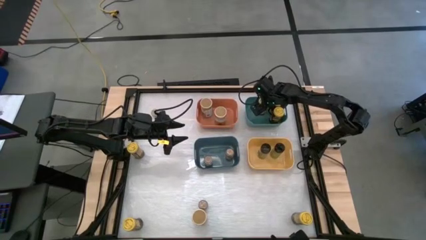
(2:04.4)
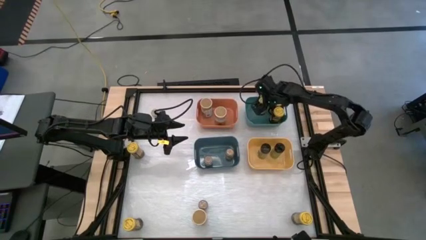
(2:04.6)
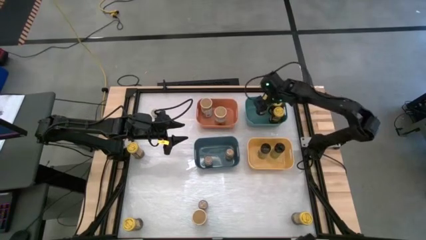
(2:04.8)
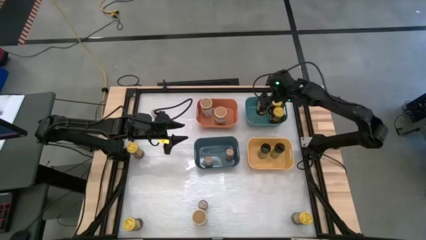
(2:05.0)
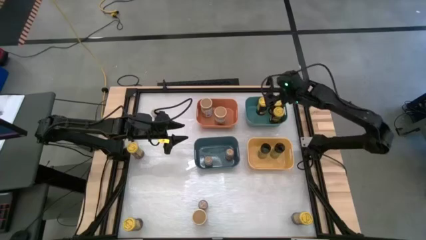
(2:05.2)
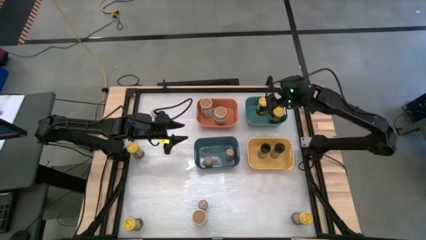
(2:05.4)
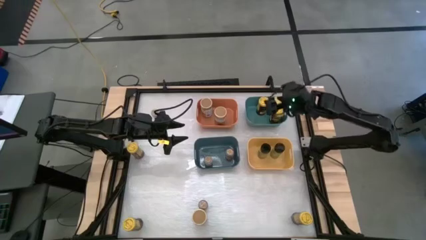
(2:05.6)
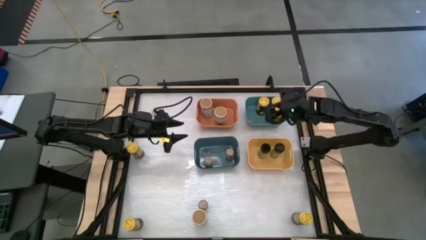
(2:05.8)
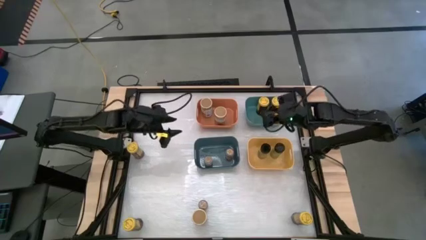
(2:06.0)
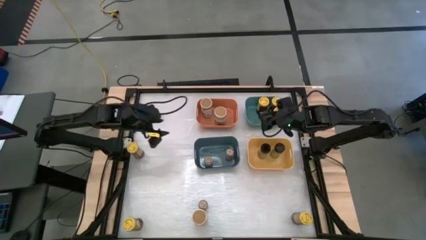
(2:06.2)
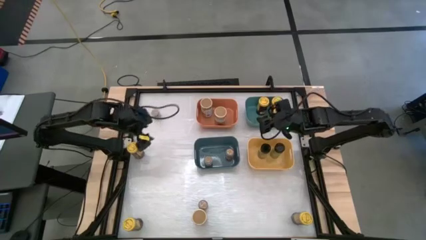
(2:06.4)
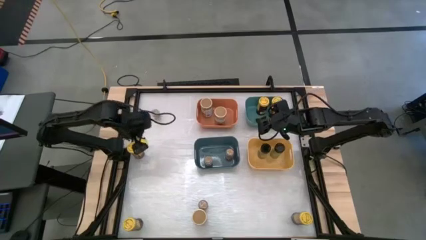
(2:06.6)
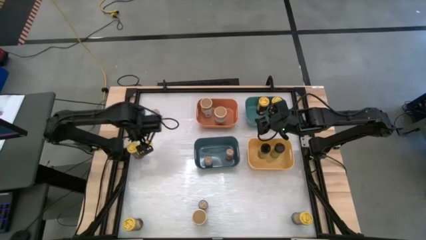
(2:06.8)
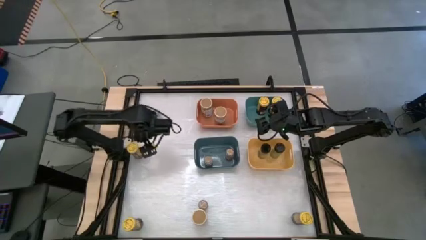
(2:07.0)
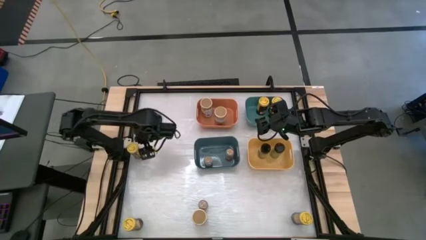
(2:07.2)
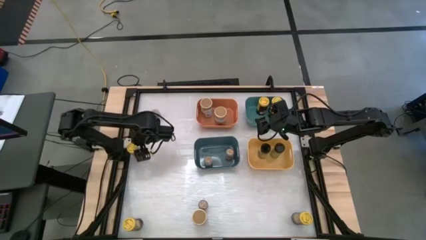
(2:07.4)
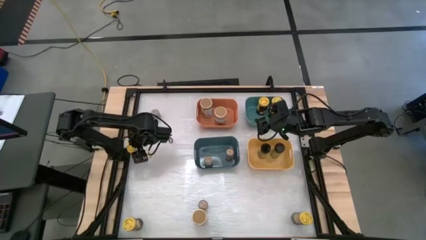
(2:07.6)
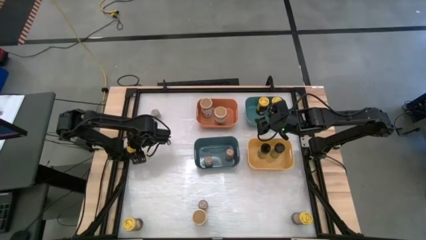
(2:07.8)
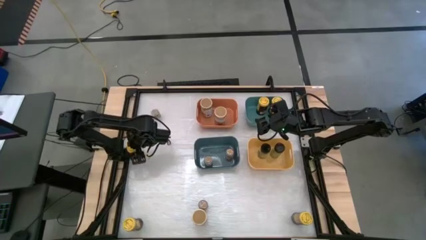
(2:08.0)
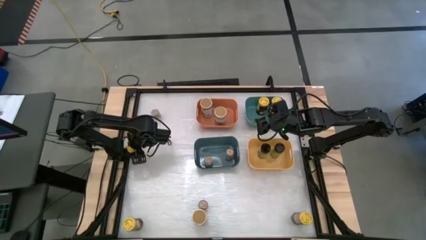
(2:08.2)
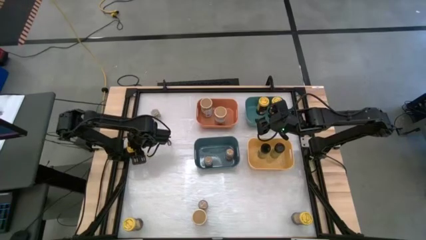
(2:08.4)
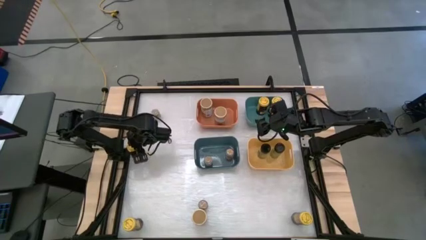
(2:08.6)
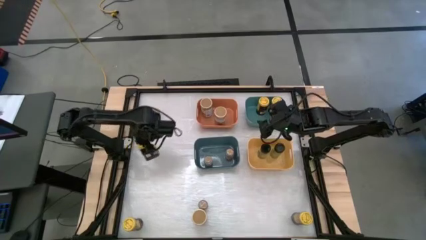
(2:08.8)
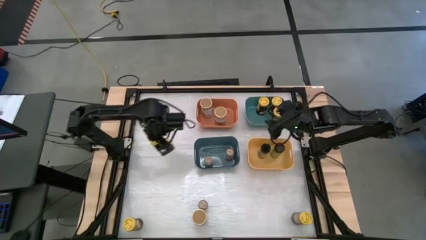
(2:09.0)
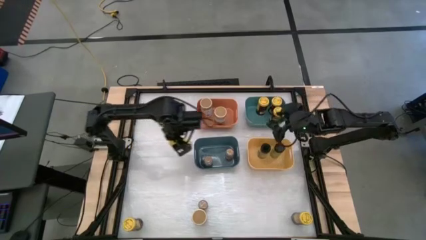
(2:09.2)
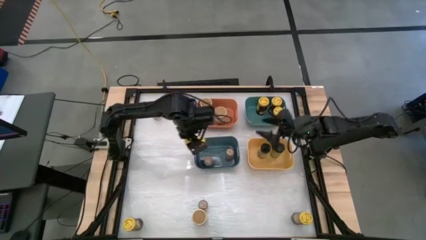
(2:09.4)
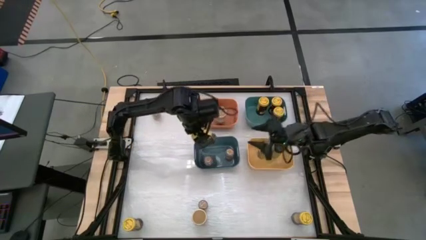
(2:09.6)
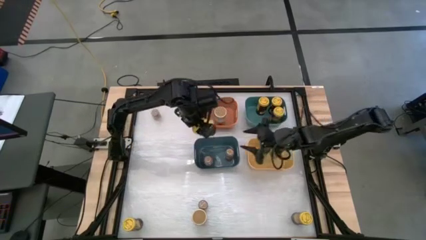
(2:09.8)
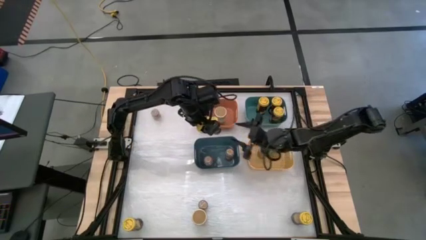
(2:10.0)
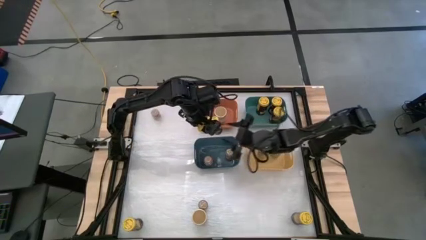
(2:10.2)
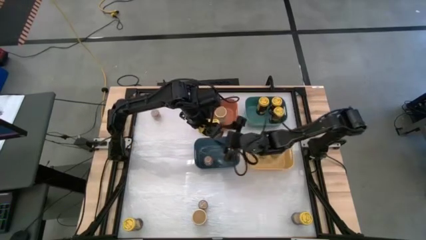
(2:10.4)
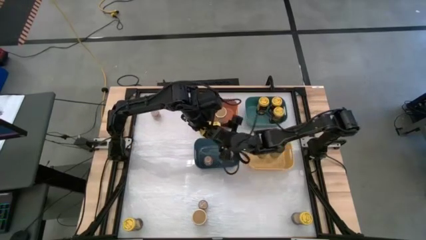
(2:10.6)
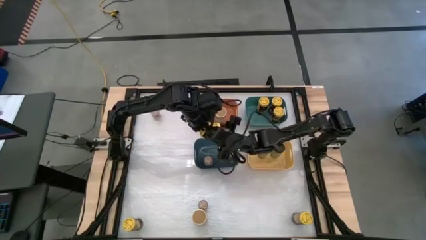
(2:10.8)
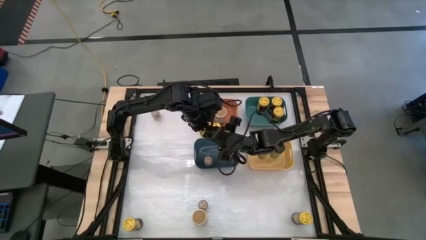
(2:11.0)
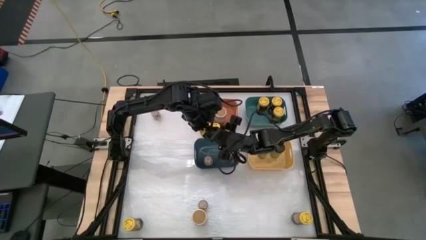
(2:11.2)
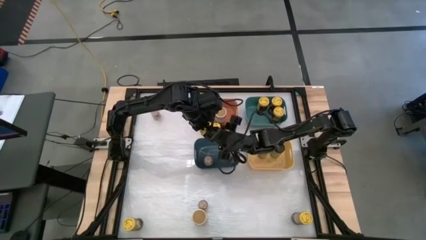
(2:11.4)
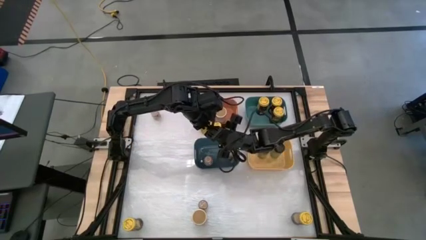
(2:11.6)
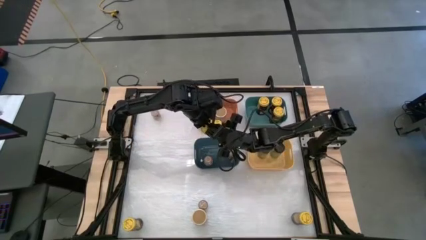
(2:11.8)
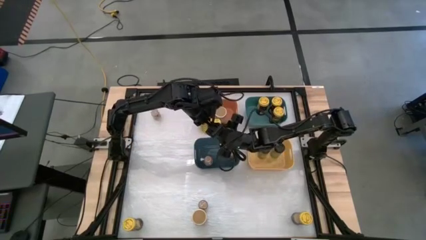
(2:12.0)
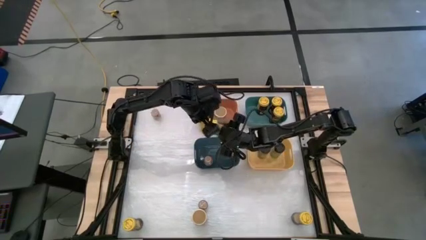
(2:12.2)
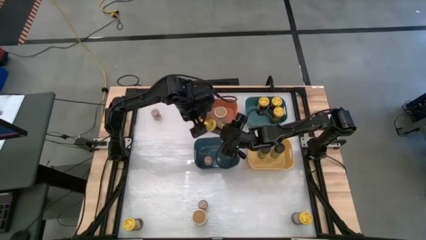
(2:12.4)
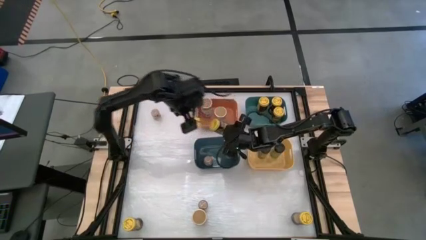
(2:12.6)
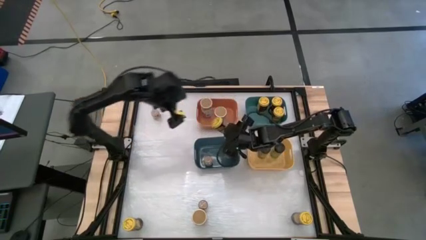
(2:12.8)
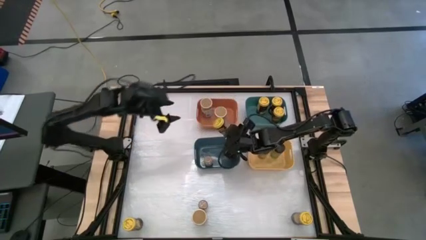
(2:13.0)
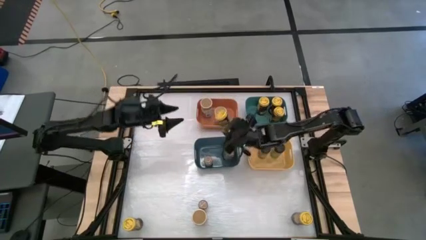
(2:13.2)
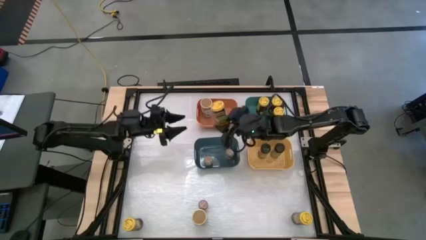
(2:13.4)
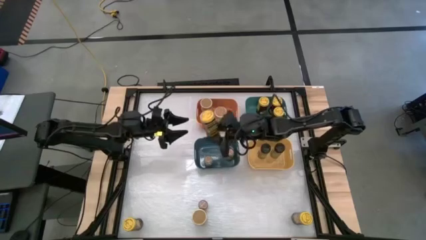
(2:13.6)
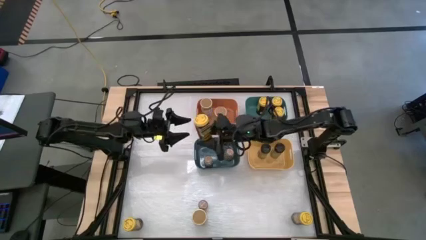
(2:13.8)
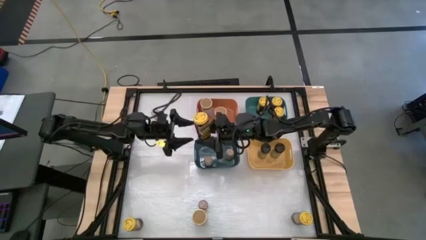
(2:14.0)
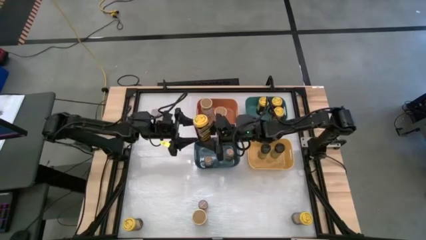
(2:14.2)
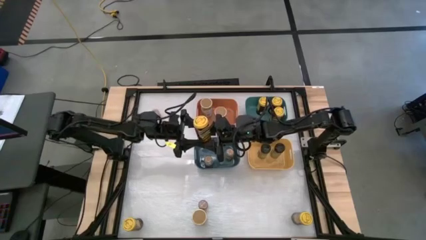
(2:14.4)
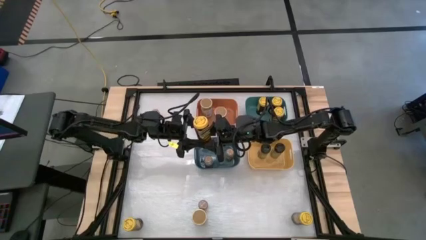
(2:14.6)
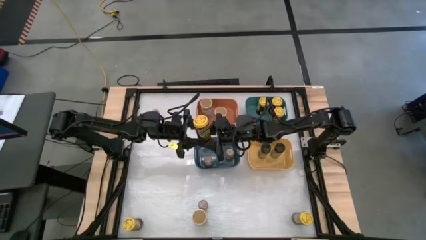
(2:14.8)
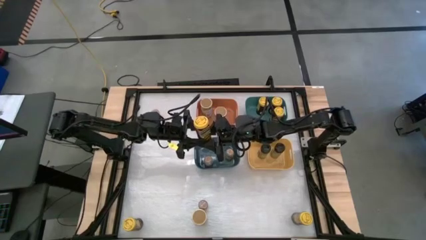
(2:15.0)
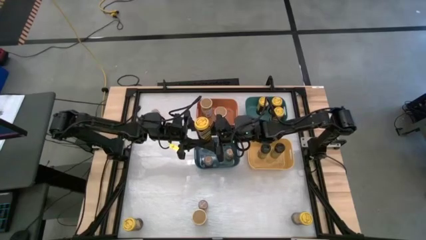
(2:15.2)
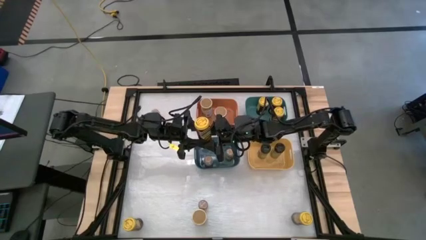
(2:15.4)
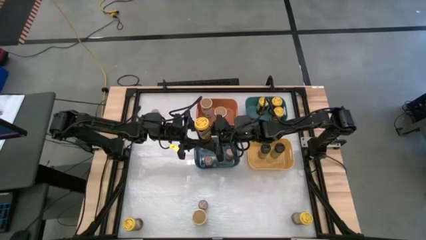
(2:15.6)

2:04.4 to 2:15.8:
Task: Sort spices by type
Put the yellow spice bottle into the green bin

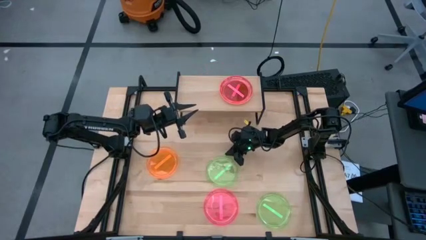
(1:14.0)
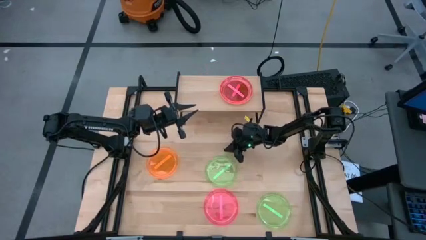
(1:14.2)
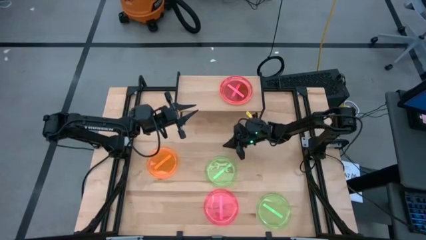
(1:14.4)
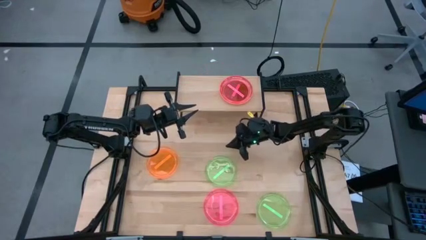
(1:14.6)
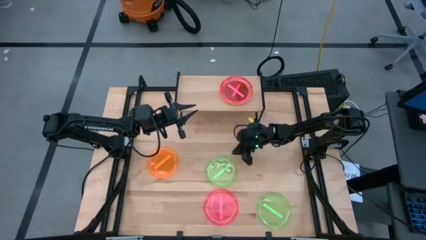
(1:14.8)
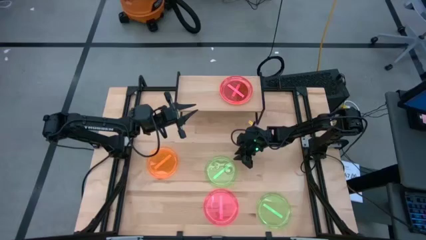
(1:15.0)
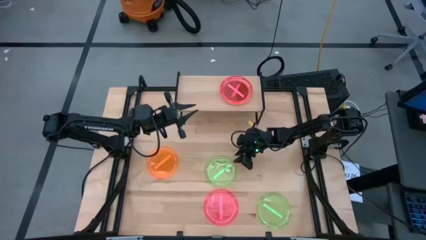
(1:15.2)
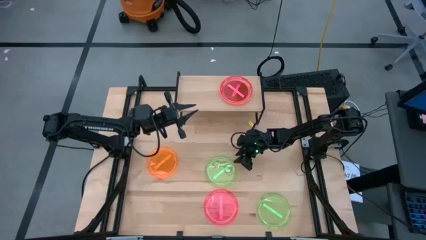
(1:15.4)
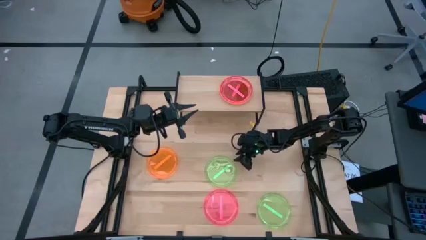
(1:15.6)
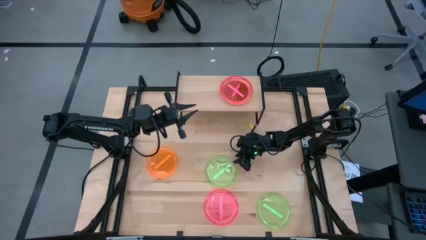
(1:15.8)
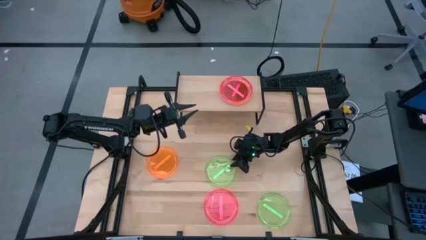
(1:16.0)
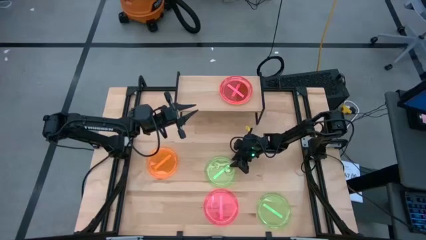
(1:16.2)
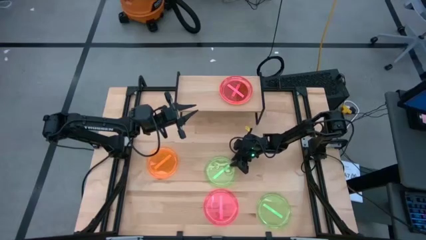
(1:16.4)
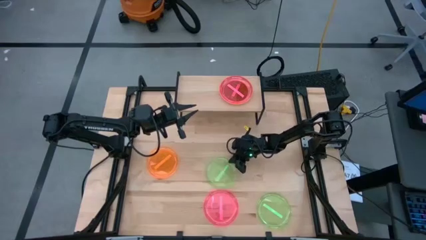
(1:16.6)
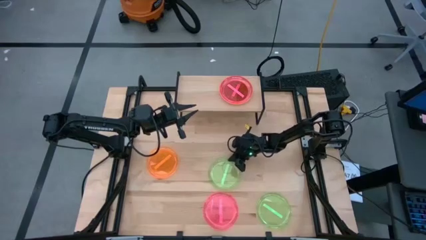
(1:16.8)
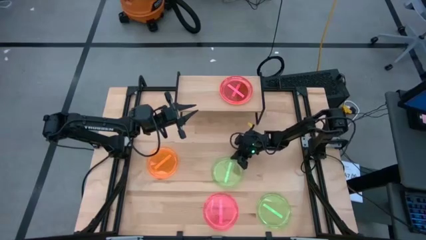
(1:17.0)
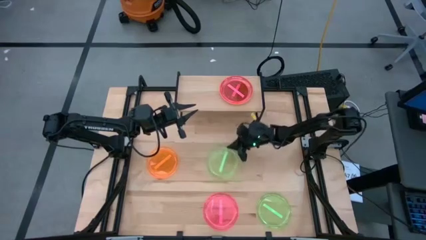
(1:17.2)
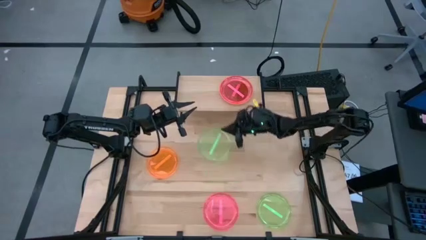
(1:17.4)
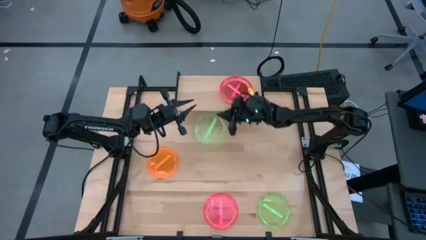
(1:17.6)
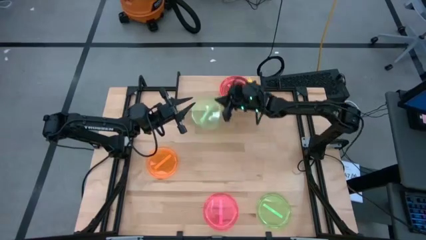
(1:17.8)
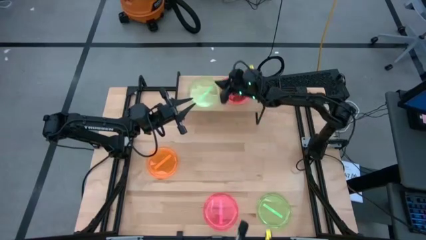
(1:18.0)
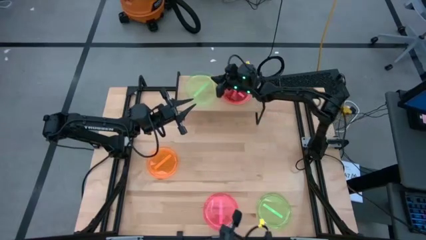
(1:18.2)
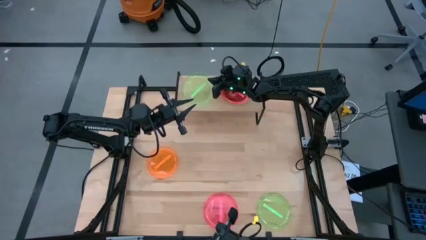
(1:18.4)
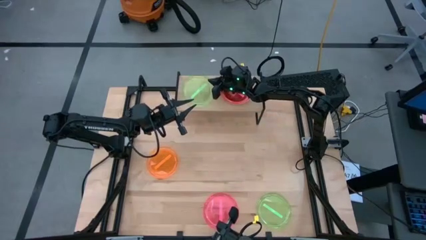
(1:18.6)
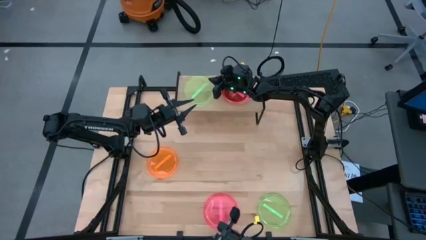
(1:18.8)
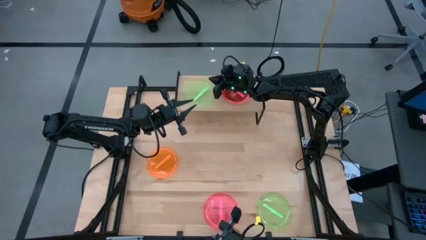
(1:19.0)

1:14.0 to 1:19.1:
Task: Place and stack plates onto a shelf
Put the green plate on the shelf
